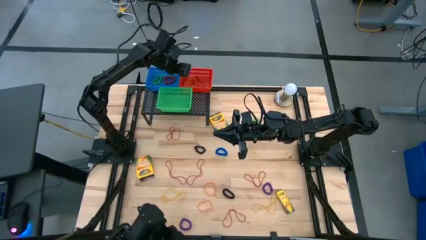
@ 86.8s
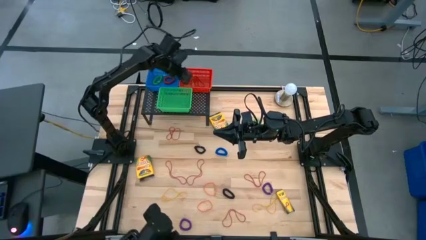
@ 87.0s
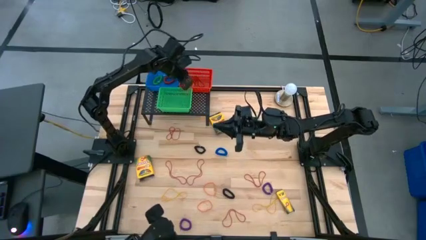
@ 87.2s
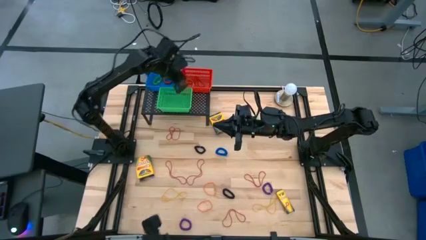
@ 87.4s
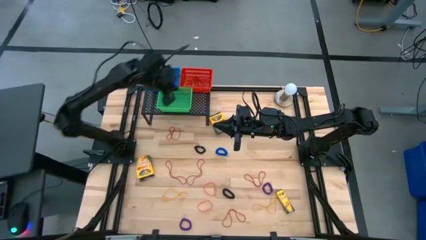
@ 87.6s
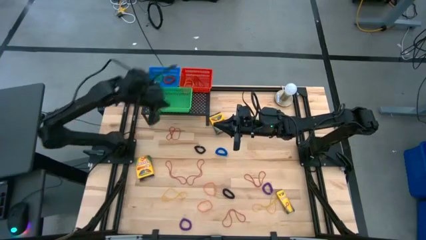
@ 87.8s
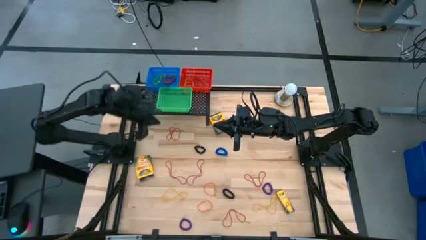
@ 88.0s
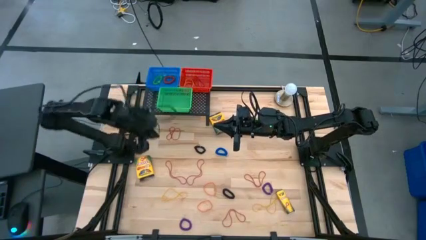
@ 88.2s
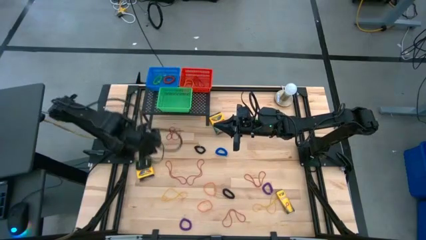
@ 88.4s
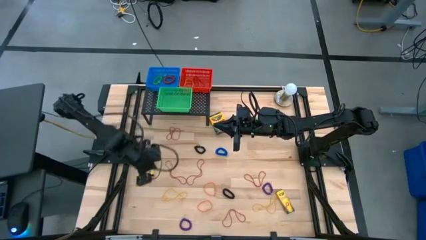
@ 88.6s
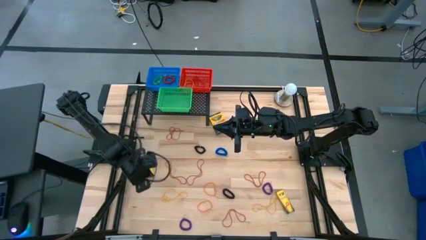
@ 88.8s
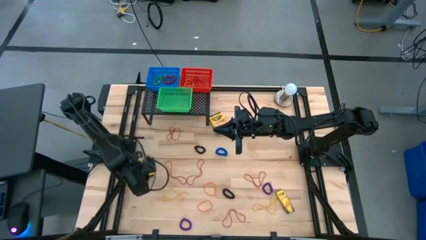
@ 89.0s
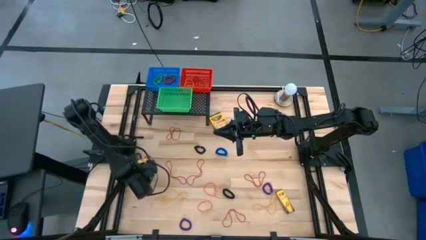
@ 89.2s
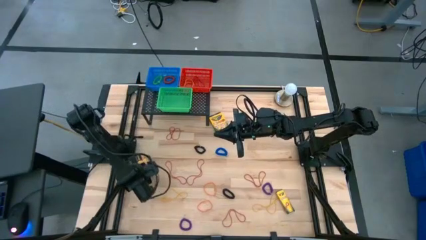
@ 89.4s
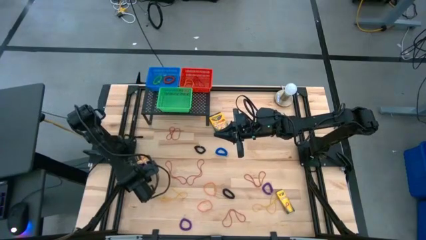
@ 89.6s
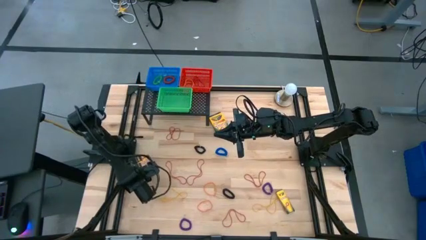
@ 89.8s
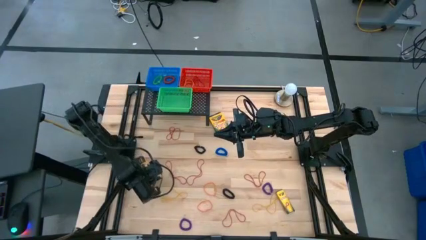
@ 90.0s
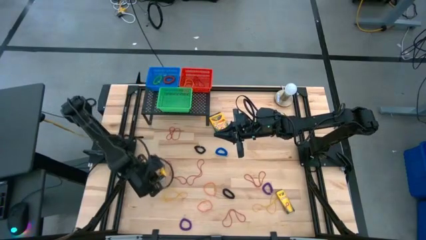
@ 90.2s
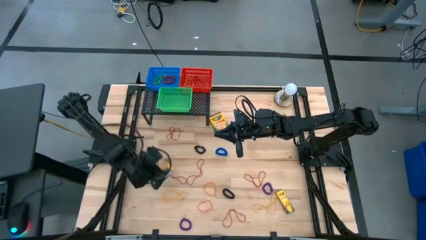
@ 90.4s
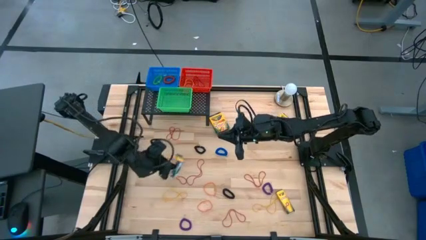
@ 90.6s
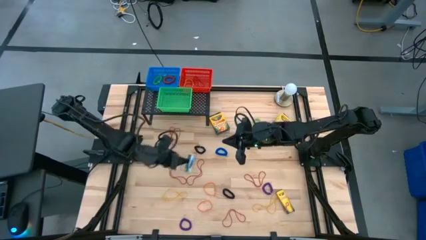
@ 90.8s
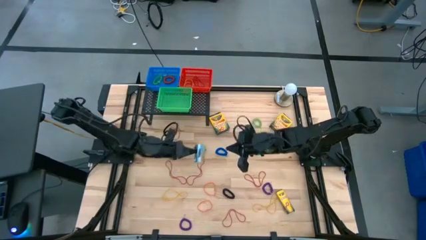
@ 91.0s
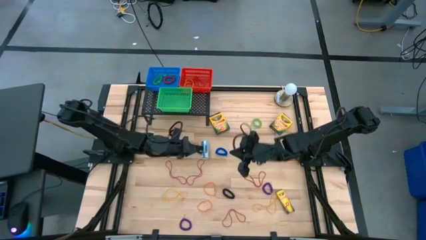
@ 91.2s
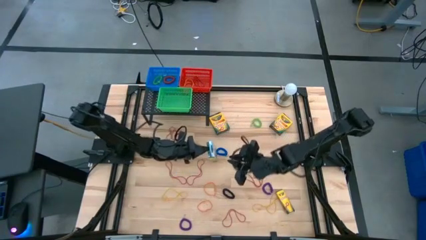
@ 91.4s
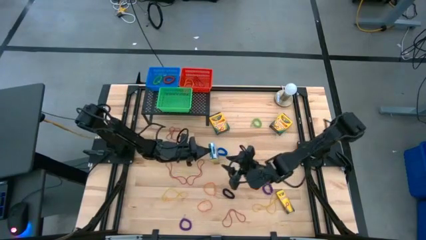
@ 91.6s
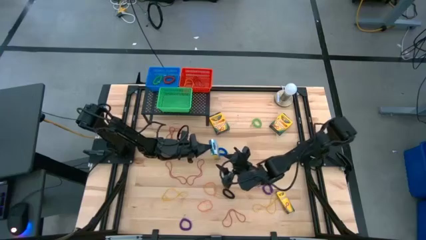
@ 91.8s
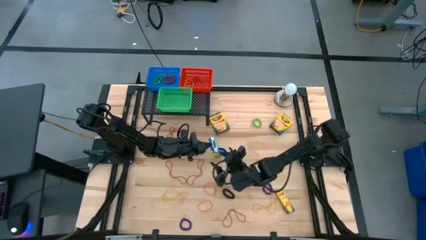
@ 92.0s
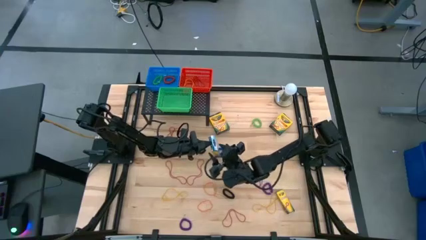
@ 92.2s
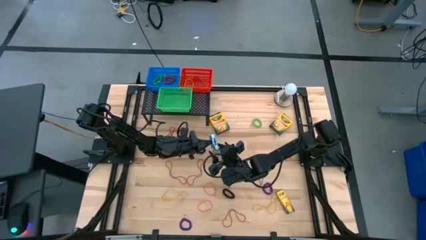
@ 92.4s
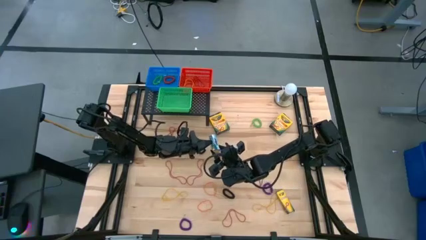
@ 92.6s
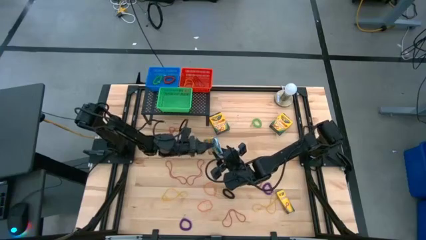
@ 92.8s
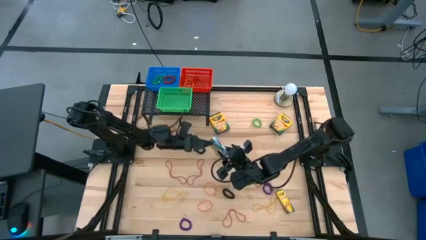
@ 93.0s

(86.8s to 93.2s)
Task: Pick & Place Office Desk Supplies
Put the crayon box into the green bin

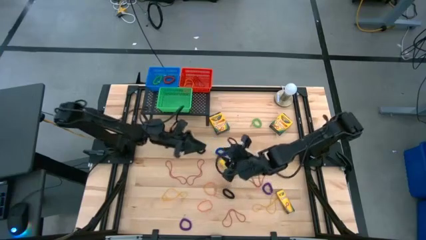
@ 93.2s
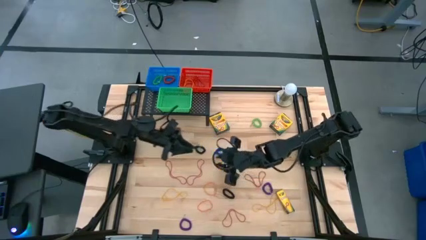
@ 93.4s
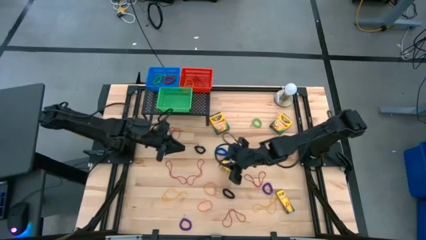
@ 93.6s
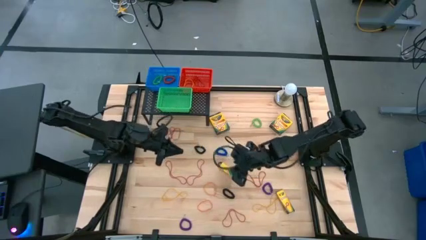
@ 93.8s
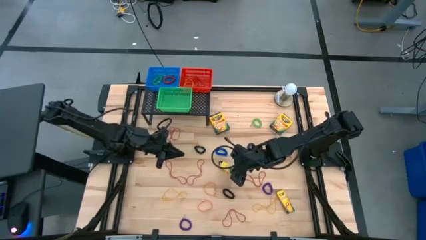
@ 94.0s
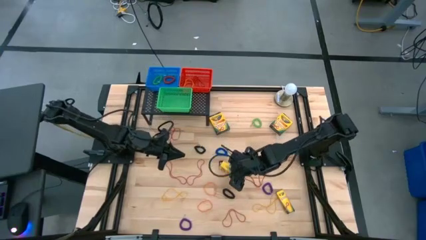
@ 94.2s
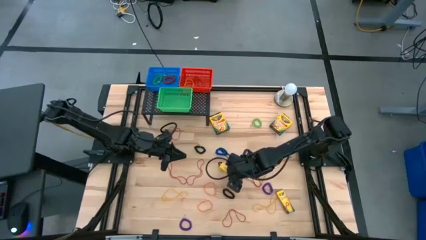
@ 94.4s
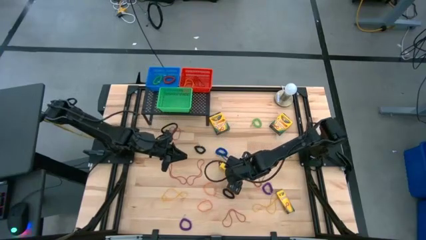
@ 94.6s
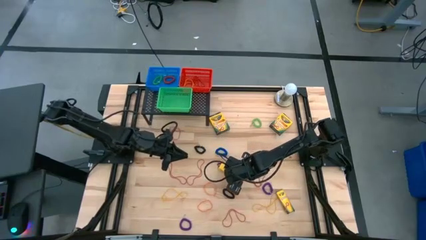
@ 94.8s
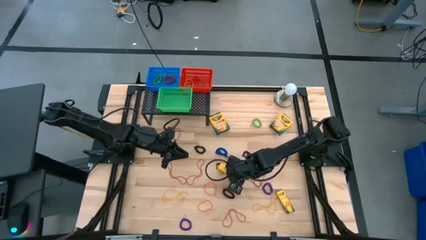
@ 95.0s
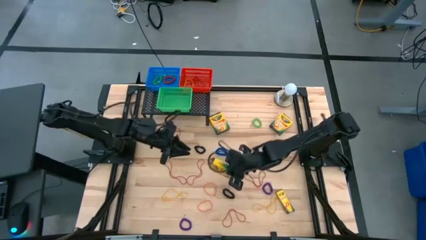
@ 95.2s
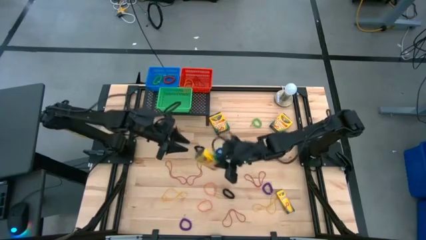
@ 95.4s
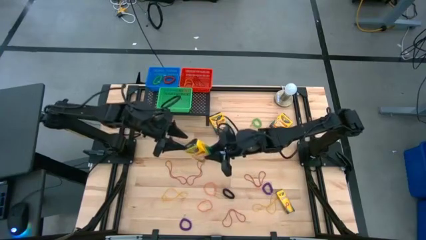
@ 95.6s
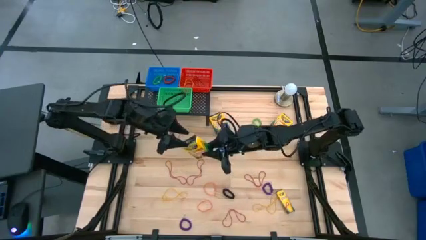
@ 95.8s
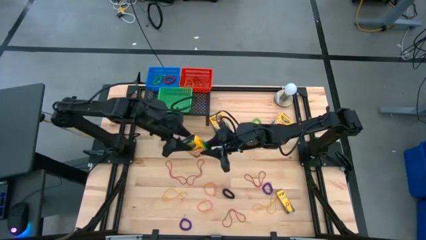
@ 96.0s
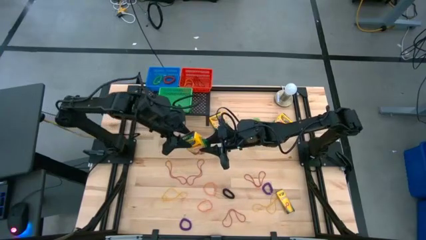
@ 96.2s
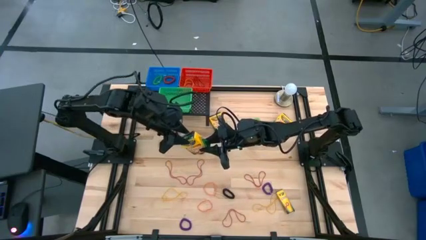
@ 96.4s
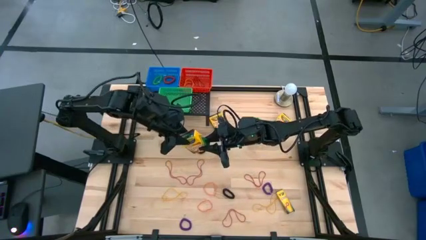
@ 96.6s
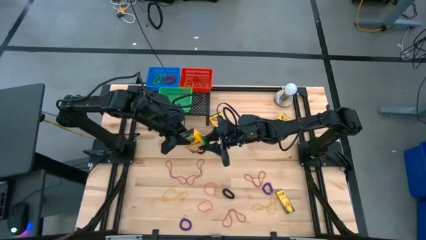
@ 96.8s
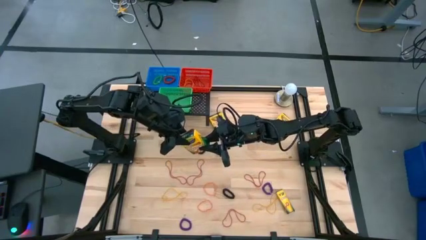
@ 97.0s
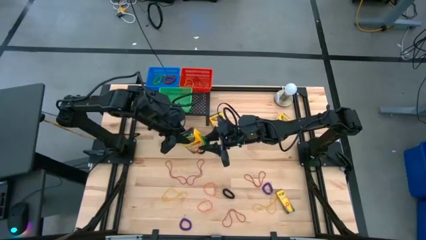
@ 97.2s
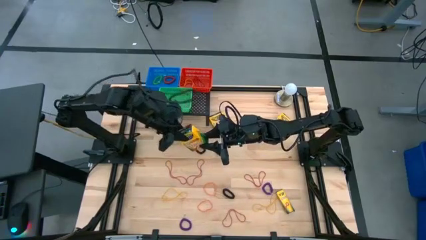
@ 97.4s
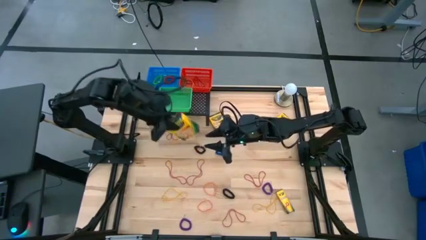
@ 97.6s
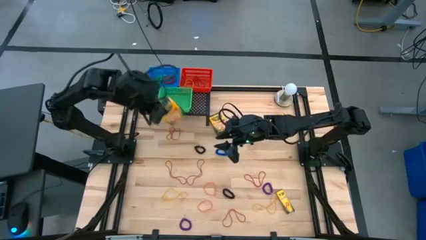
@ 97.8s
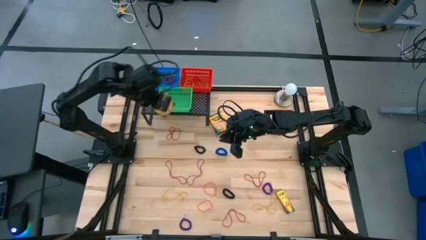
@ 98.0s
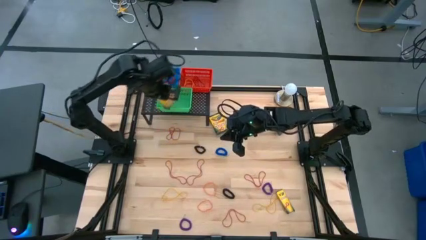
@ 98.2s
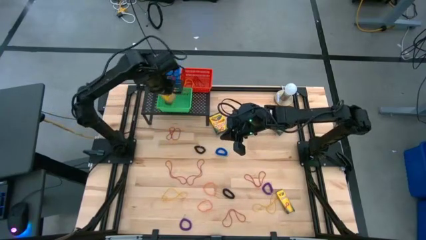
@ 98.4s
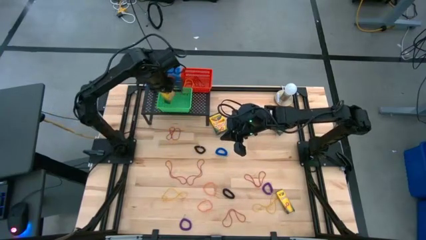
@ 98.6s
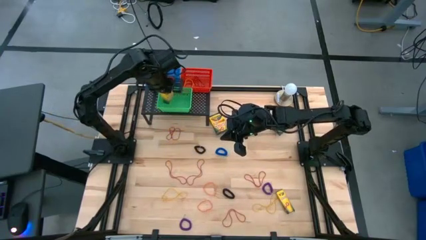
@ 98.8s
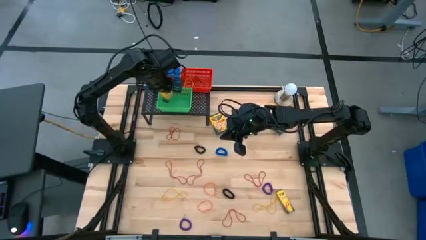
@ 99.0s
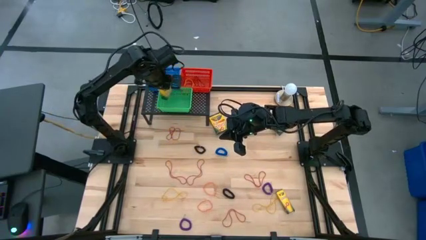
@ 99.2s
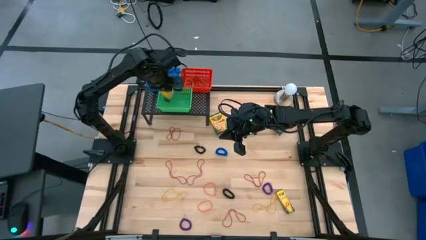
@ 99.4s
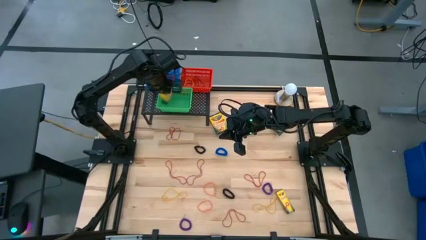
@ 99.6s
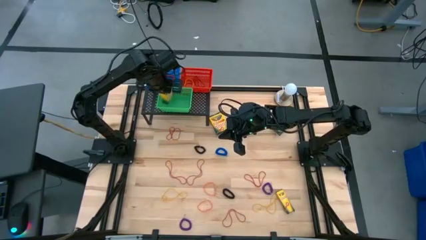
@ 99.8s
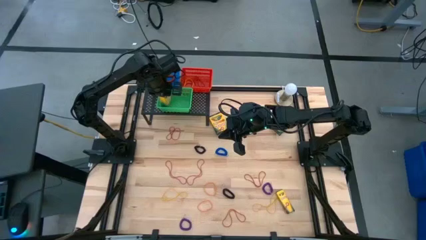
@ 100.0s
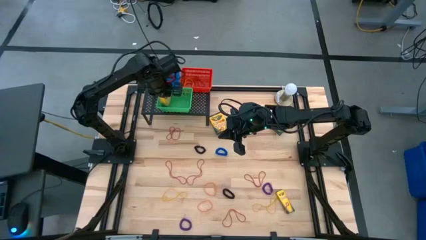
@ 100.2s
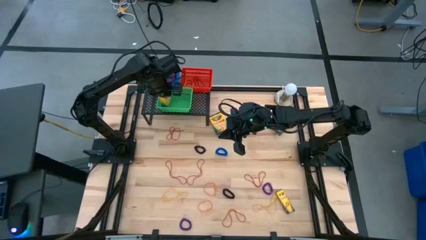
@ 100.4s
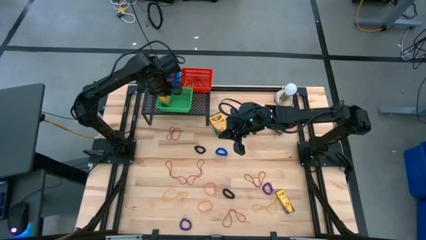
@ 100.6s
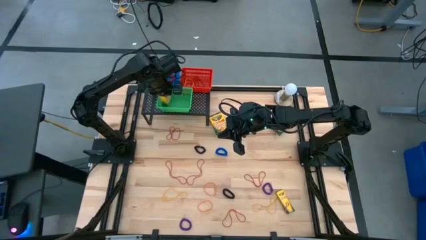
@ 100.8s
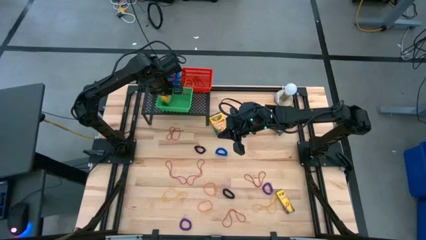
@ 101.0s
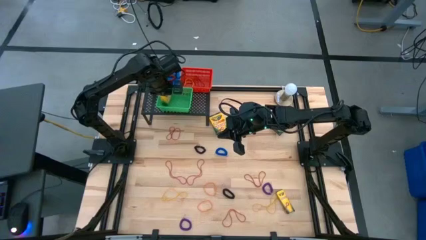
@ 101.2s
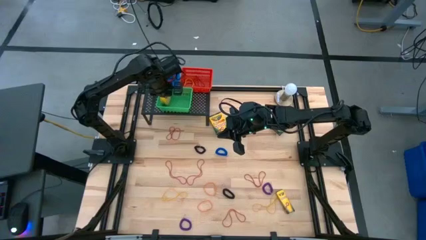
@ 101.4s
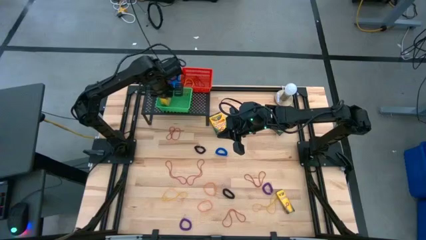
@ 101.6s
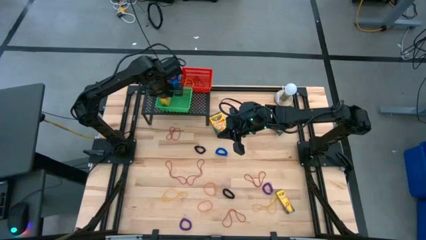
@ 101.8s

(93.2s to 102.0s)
Put the crayon box into the bin
